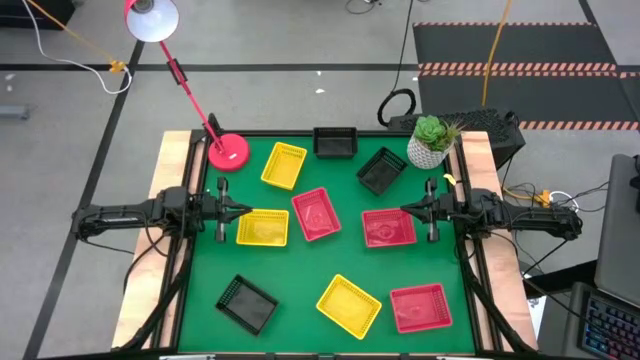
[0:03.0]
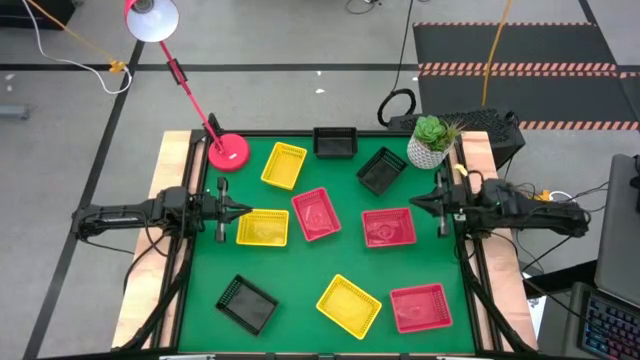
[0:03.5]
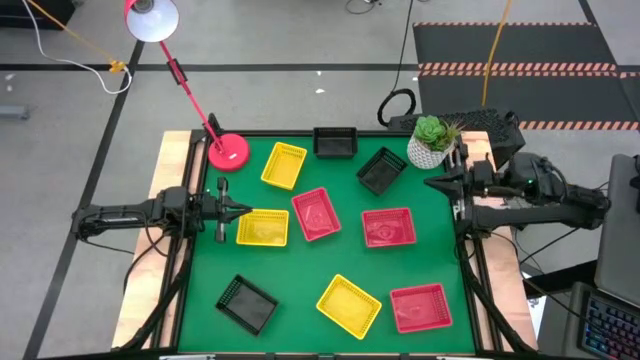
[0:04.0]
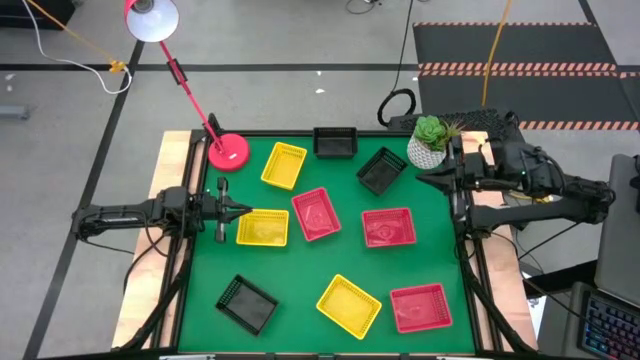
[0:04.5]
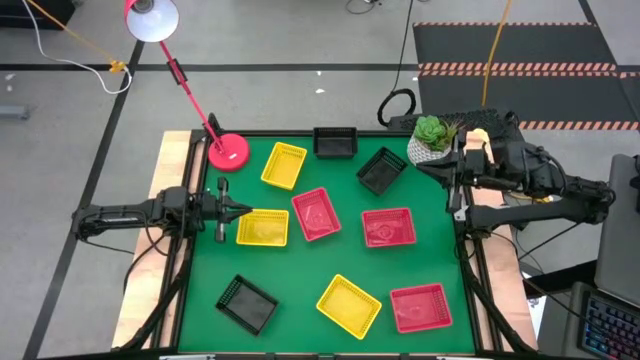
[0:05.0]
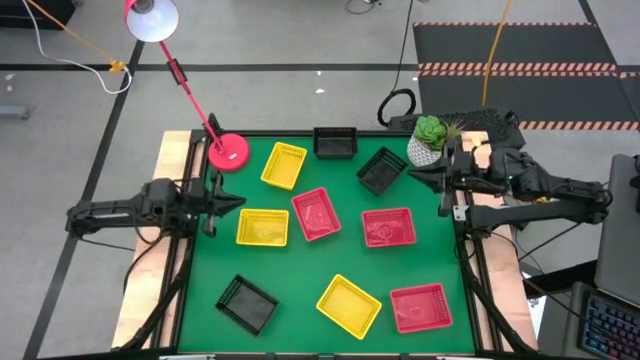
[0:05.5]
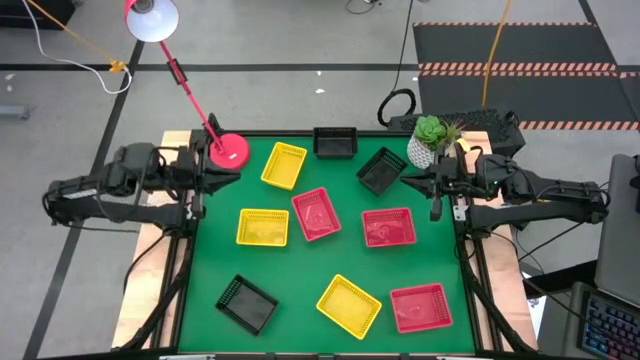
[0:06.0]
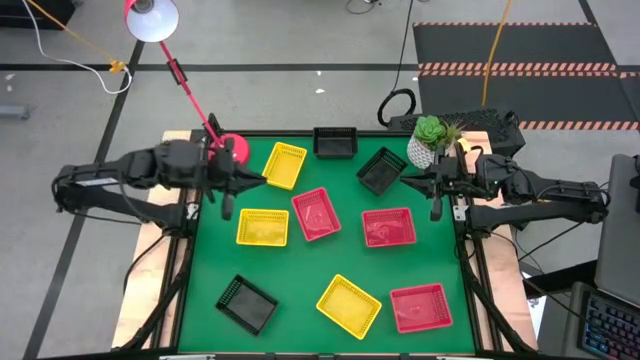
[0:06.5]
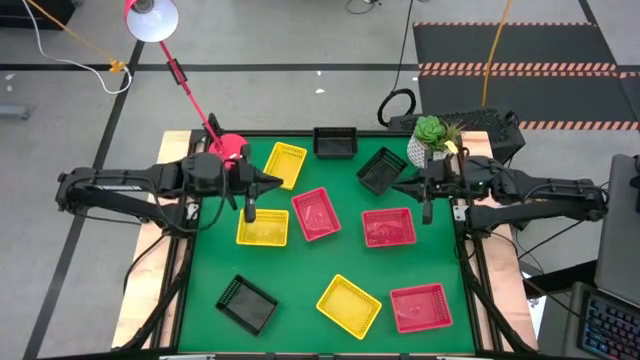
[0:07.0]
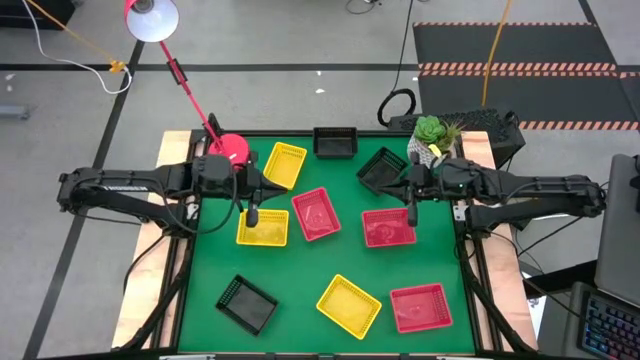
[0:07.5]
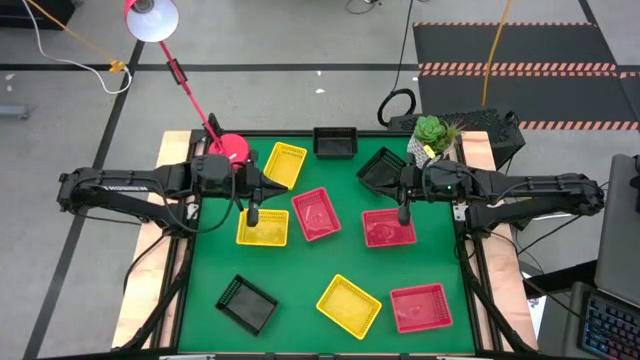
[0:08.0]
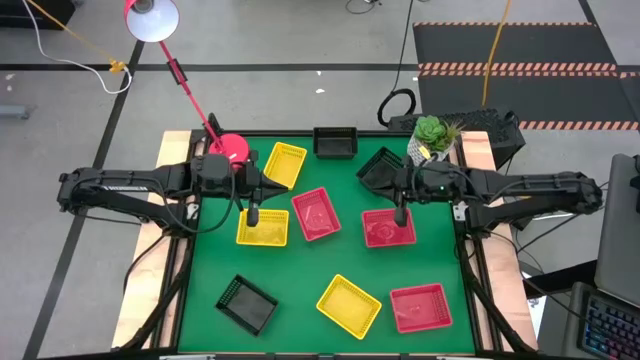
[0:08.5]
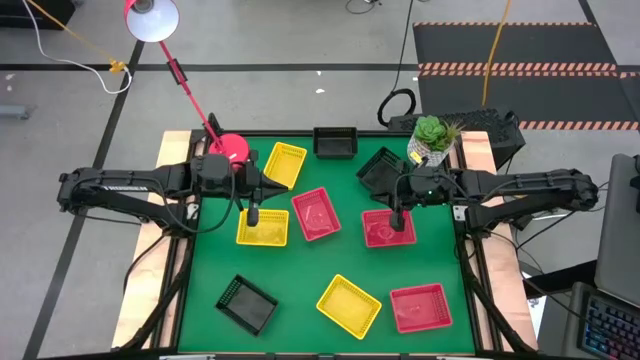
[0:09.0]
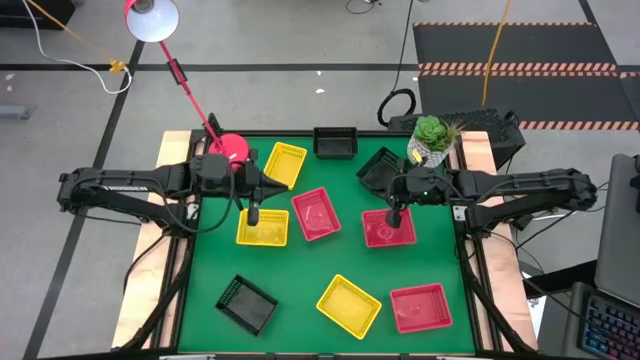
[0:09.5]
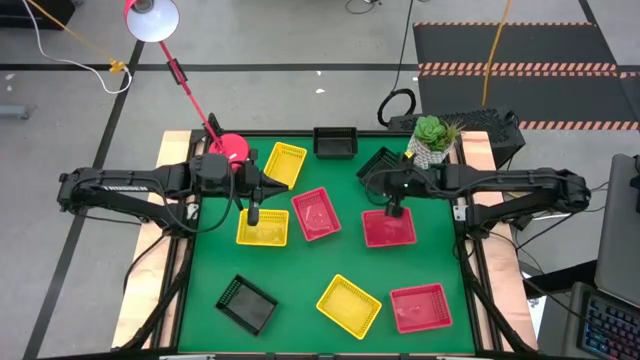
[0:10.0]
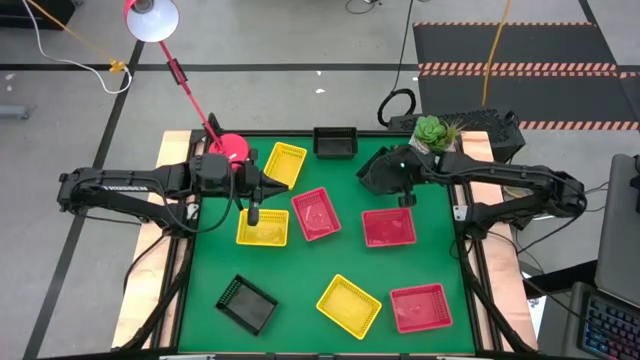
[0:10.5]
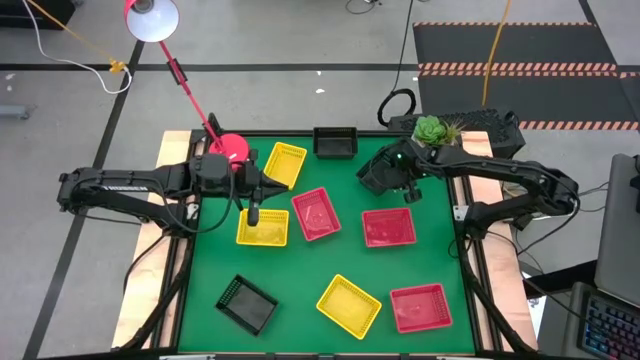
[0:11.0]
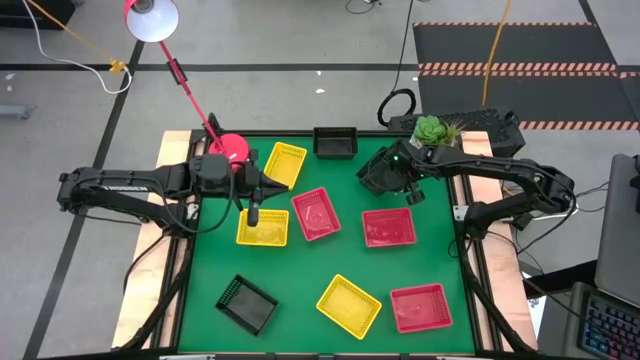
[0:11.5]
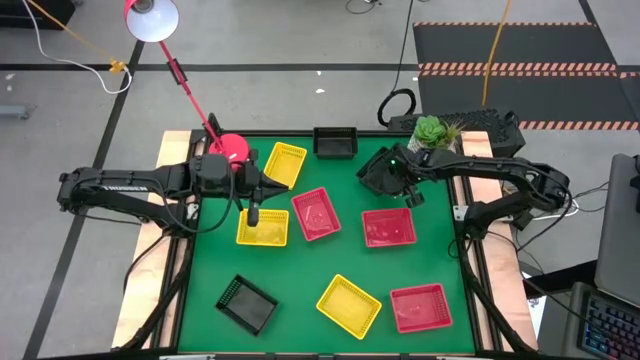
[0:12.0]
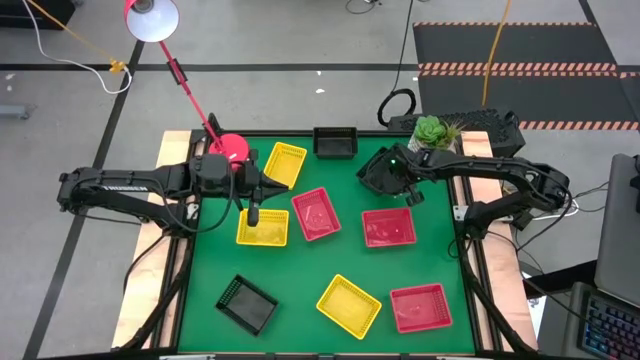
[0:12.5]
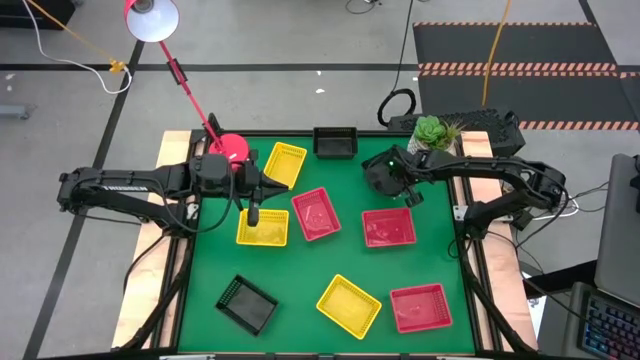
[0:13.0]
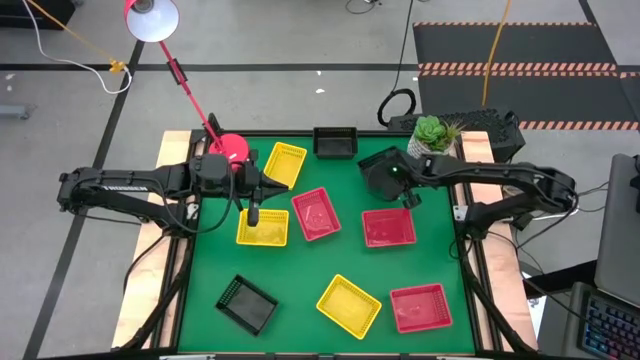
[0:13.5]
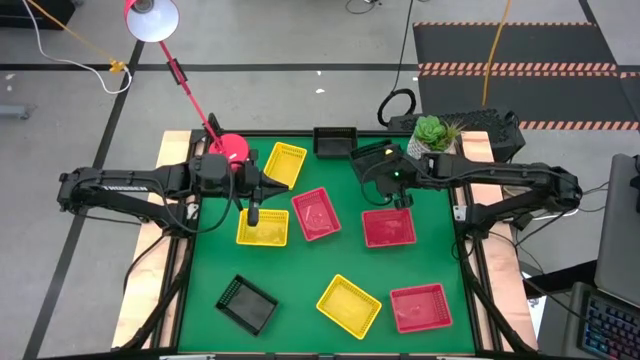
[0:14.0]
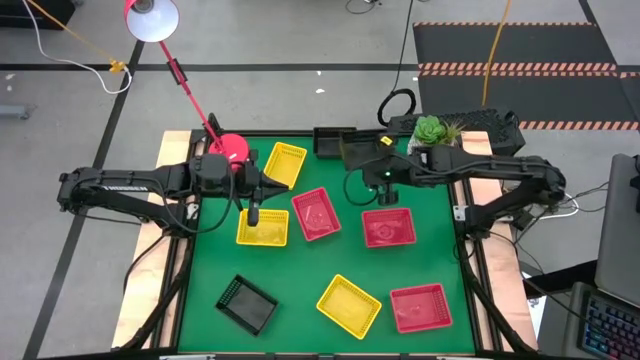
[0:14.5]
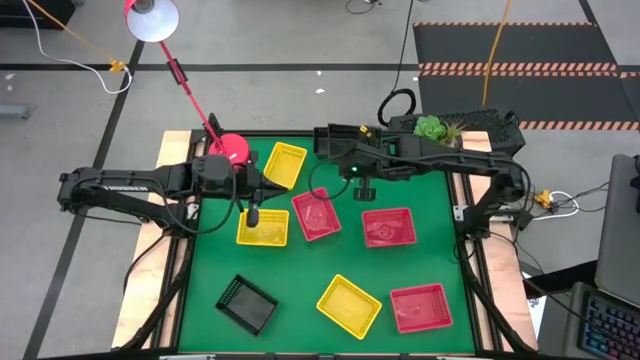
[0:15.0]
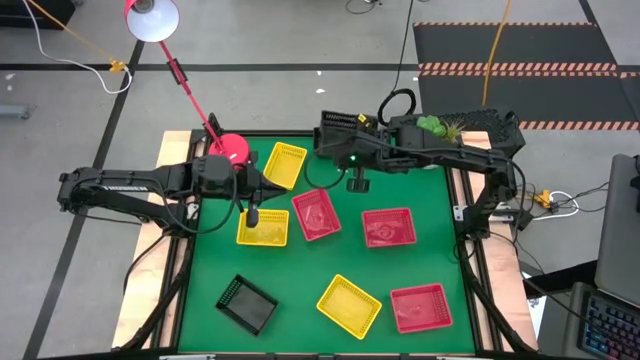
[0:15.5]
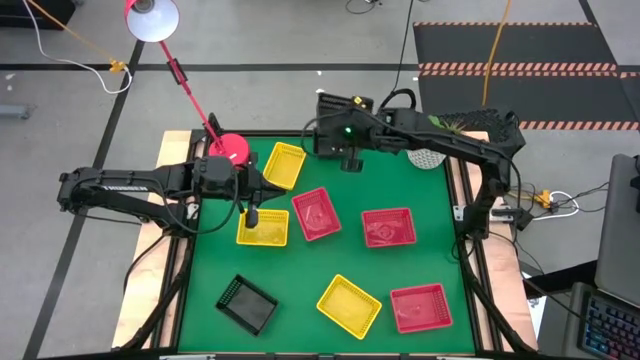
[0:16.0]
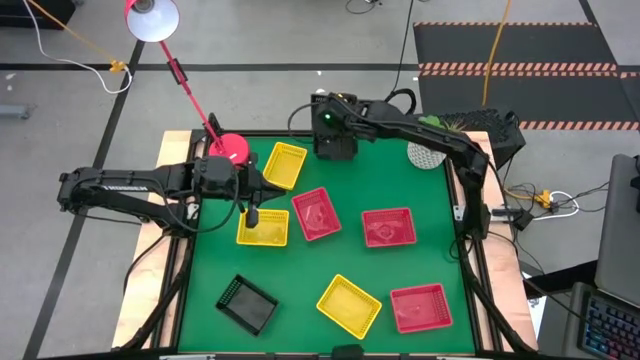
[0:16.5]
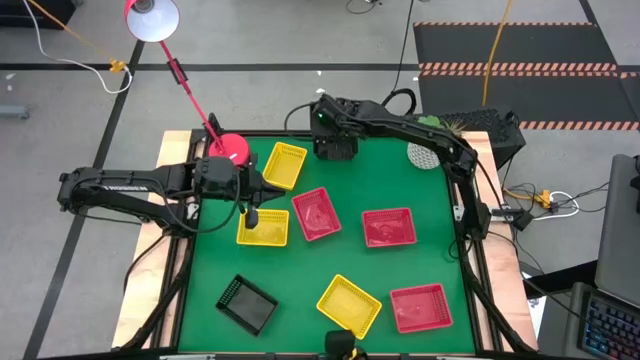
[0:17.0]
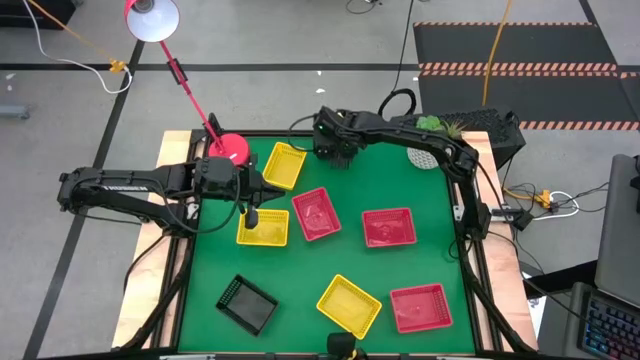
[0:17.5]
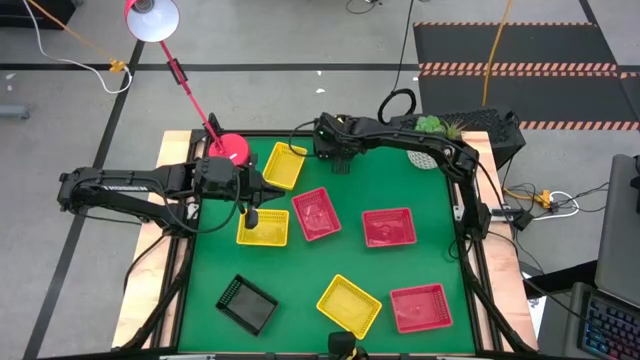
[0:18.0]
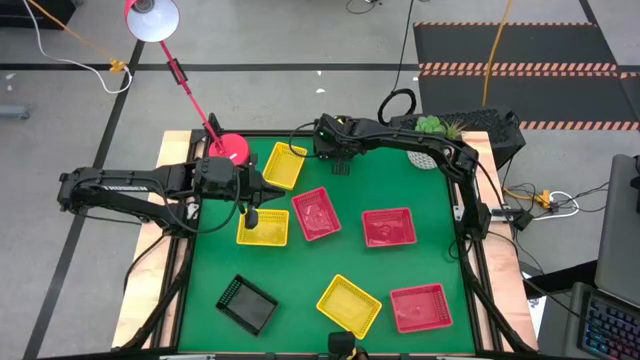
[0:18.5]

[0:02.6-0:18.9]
Stack the middle black bin on the top black bin
